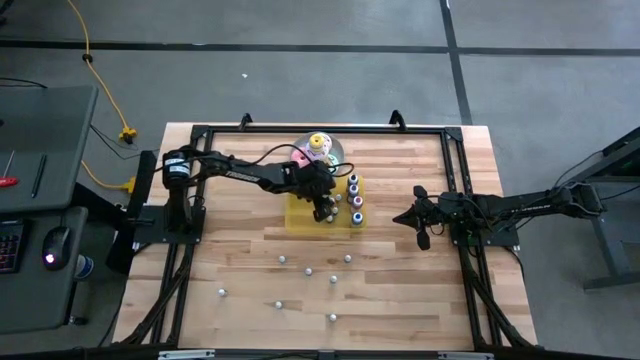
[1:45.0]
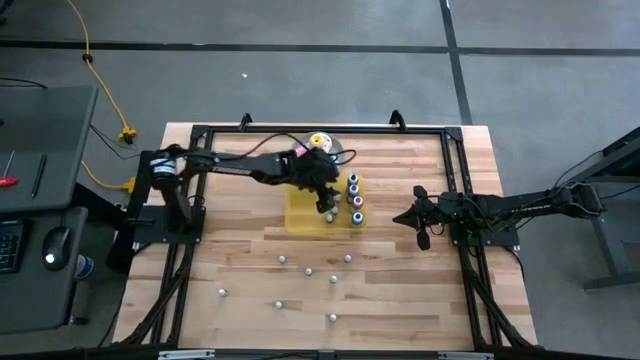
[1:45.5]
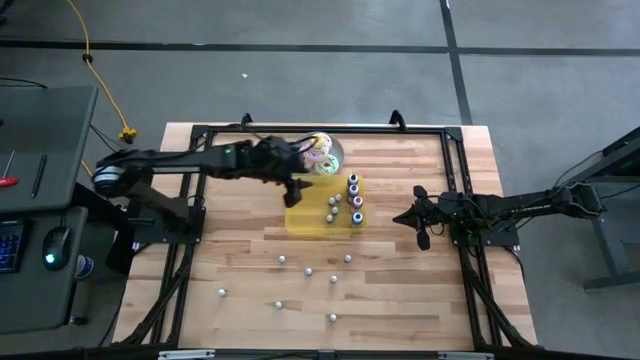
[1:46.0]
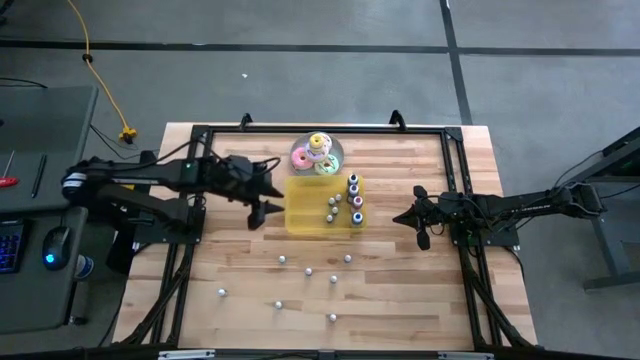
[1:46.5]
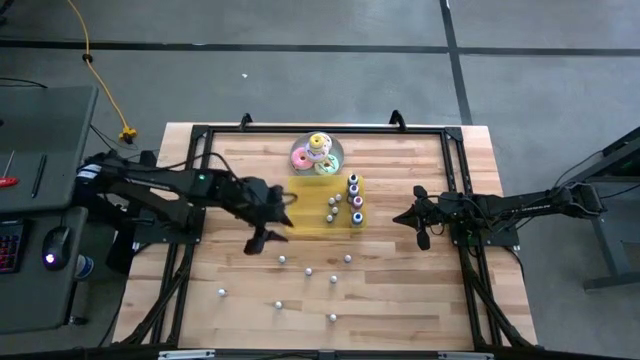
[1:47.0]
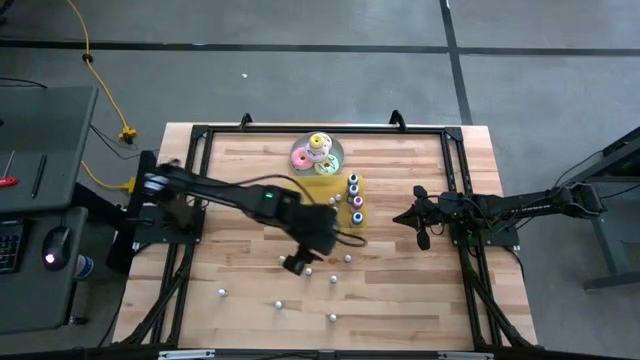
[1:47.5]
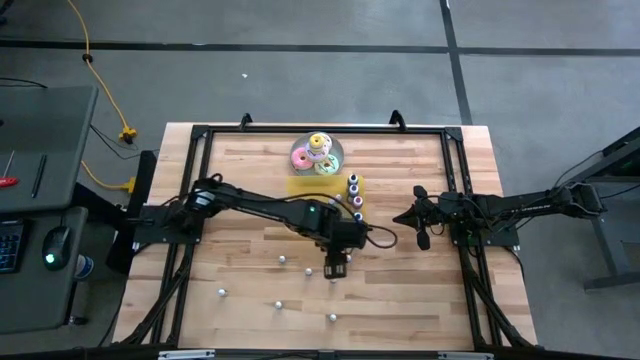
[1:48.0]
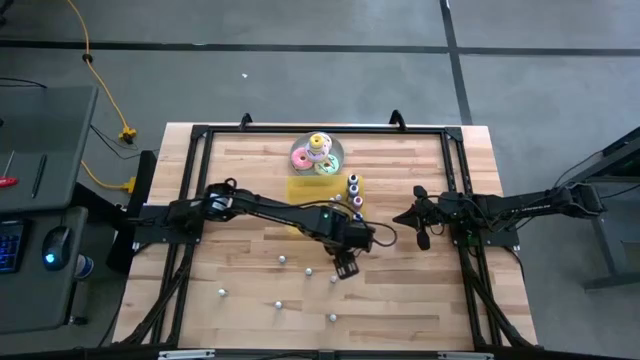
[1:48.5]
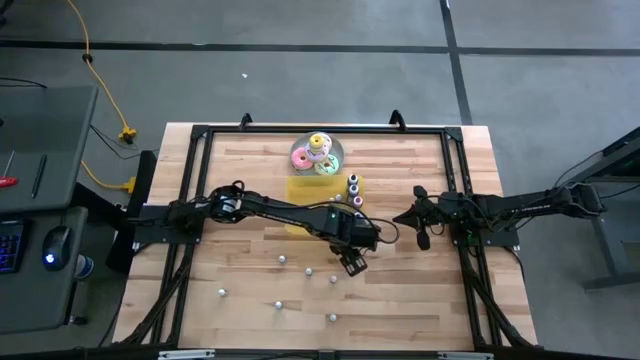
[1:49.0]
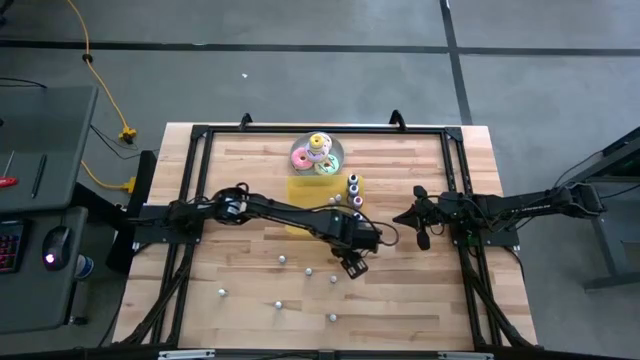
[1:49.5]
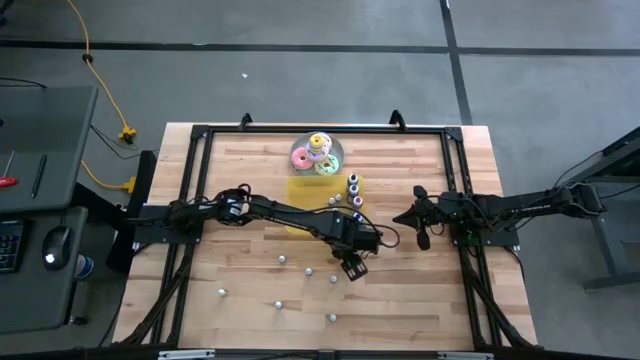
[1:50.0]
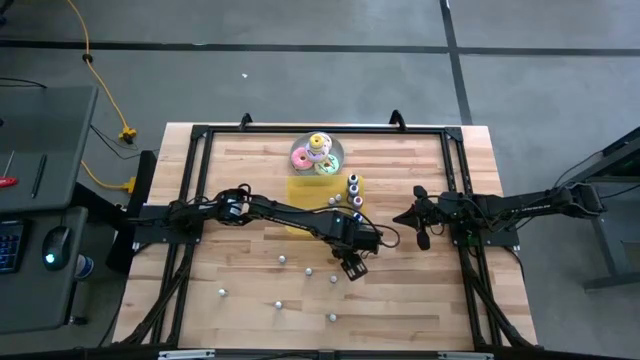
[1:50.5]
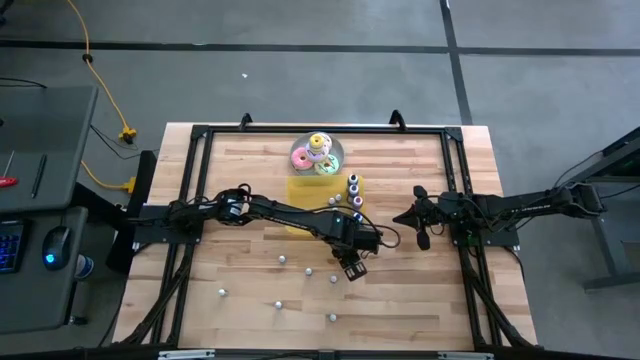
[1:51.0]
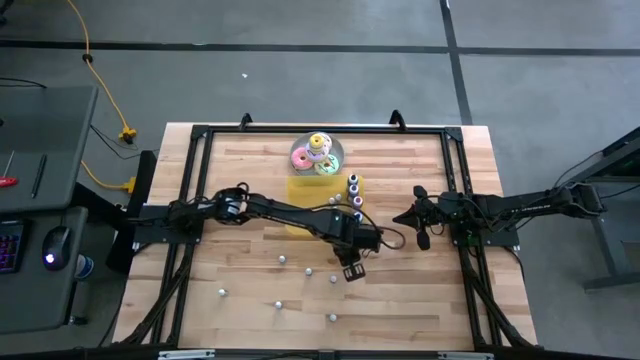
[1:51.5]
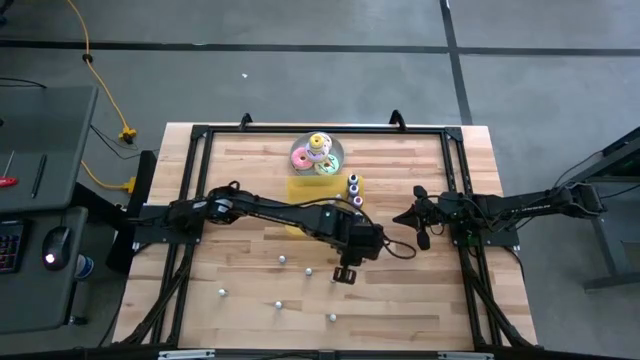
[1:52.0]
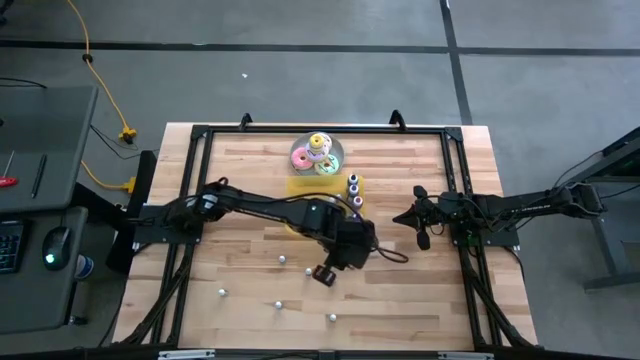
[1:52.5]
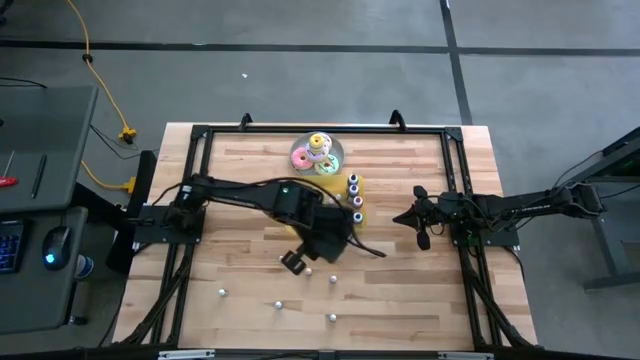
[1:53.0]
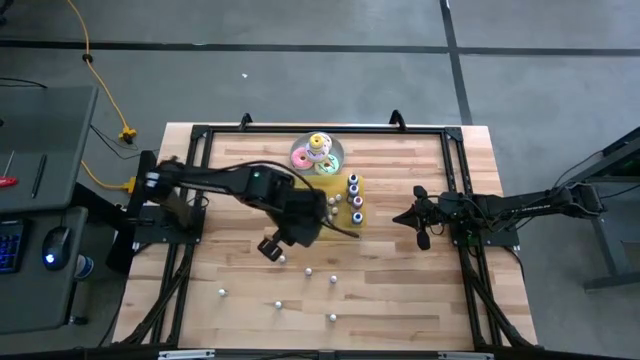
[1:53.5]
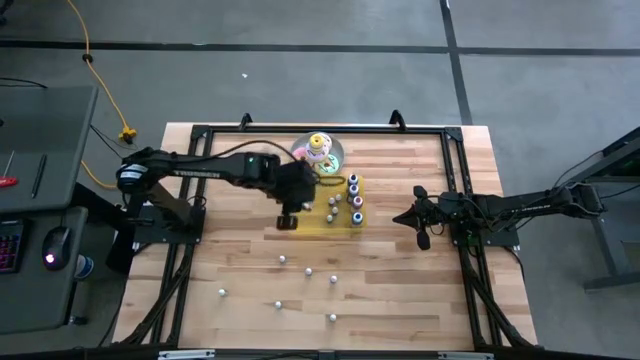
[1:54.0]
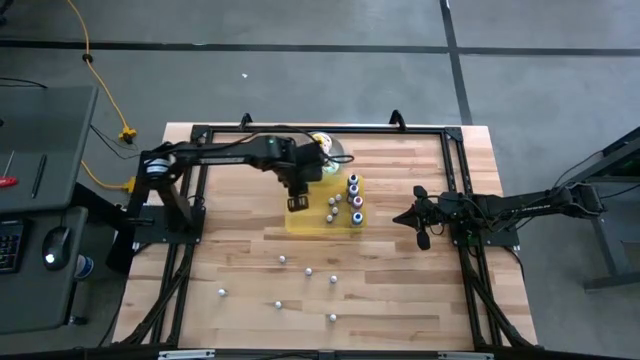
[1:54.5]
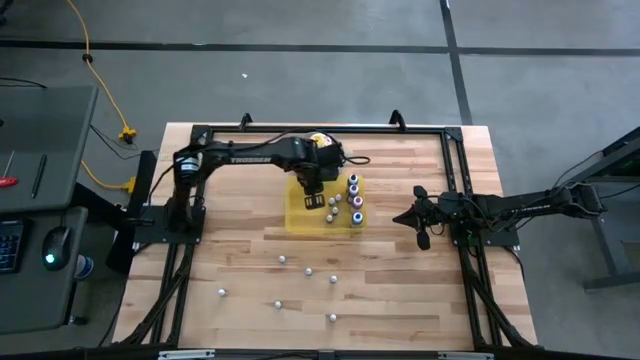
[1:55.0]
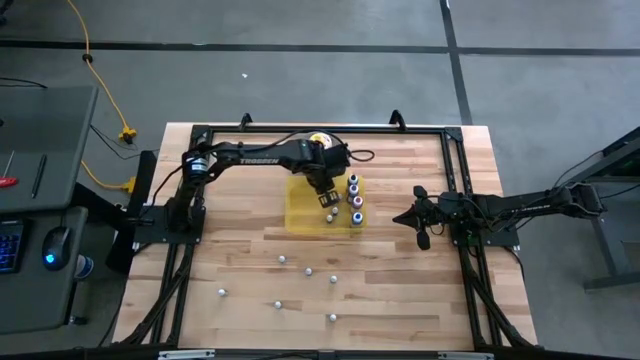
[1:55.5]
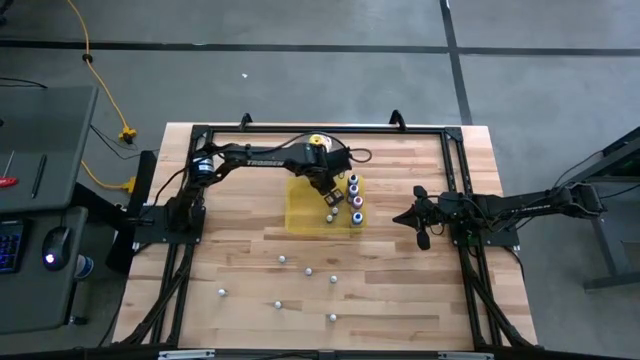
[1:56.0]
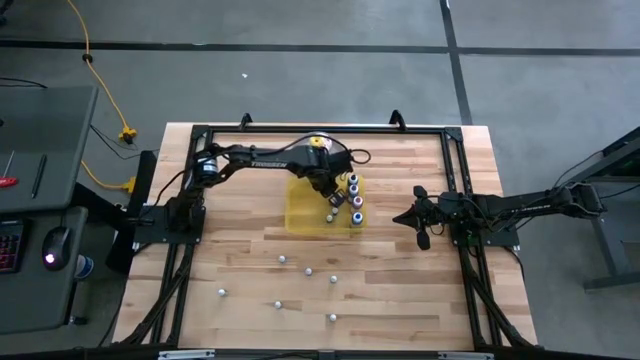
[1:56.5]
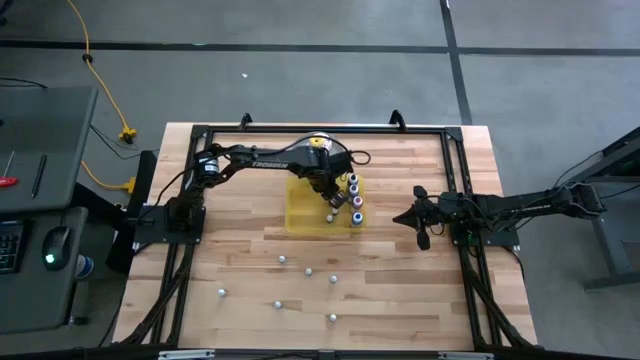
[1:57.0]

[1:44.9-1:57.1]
Task: Pick & Place food coloring
Put the top small red food coloring bottle into the yellow container

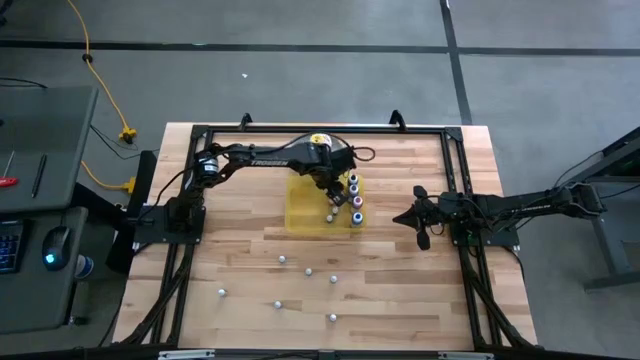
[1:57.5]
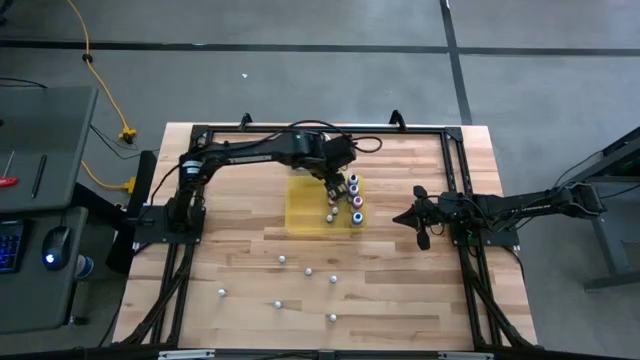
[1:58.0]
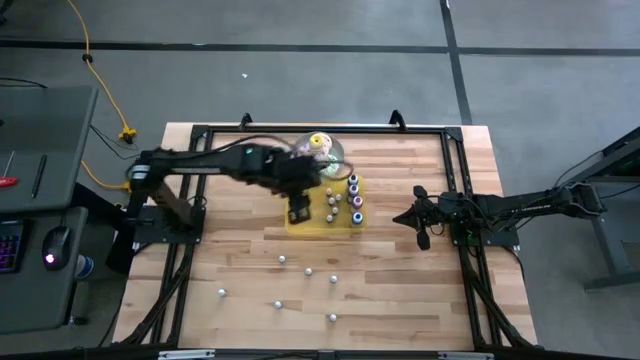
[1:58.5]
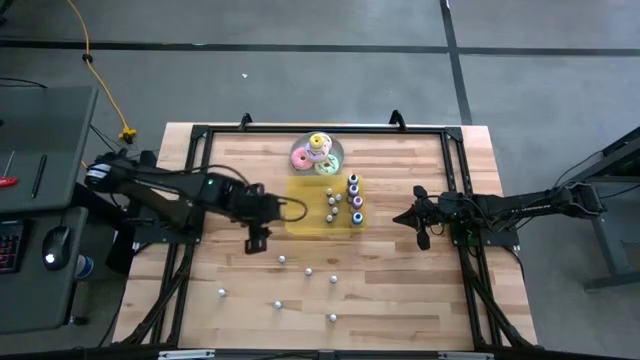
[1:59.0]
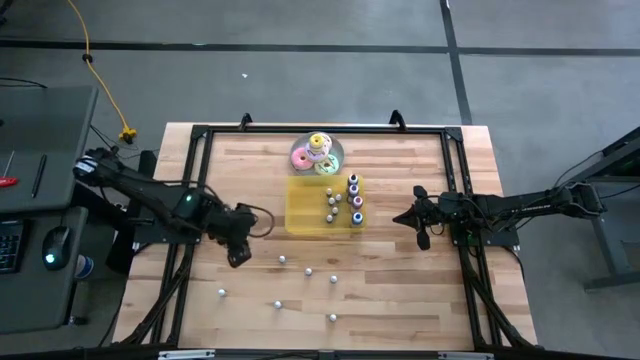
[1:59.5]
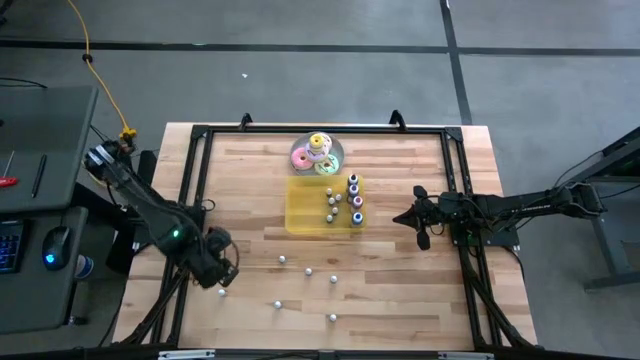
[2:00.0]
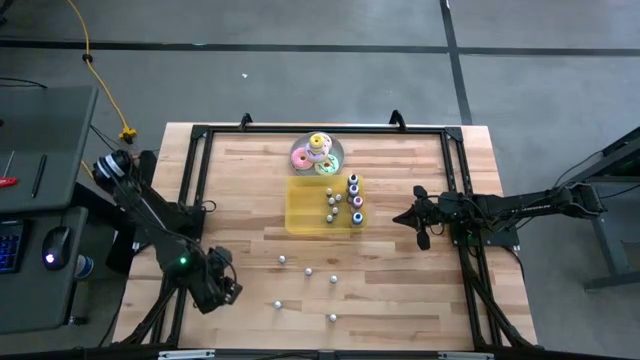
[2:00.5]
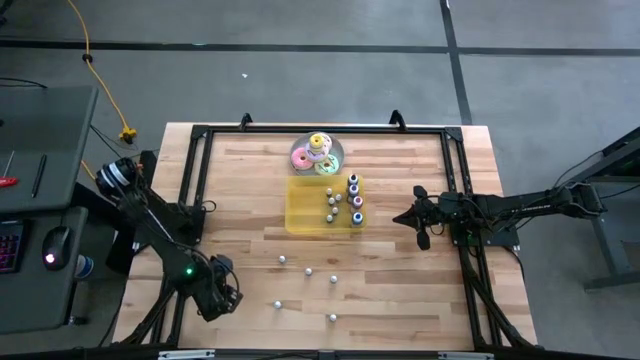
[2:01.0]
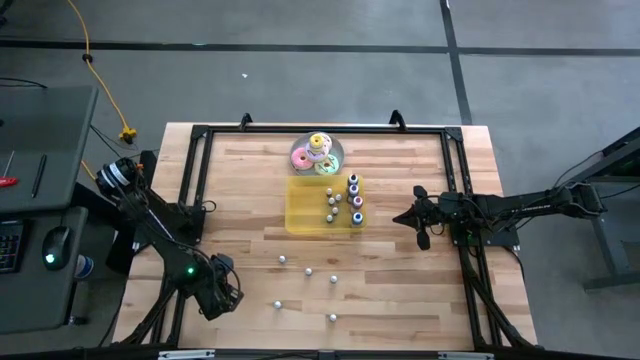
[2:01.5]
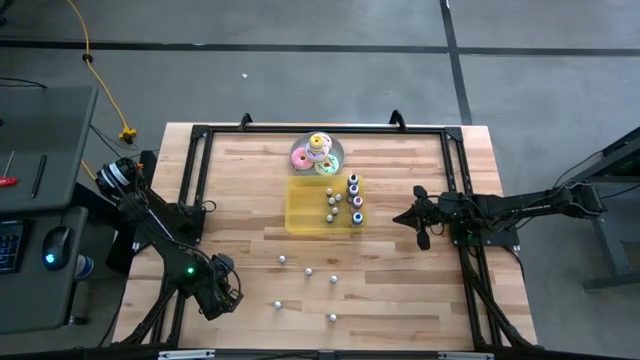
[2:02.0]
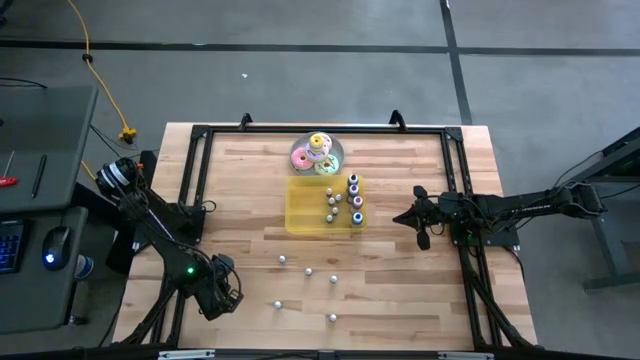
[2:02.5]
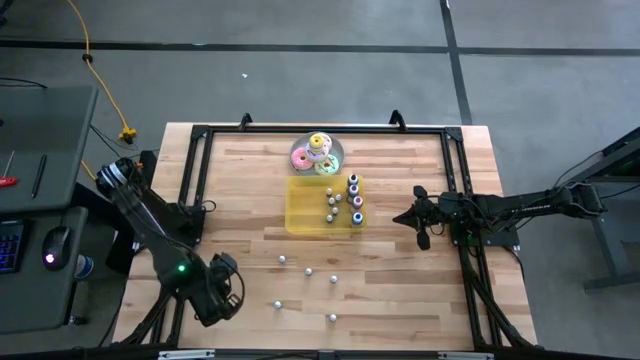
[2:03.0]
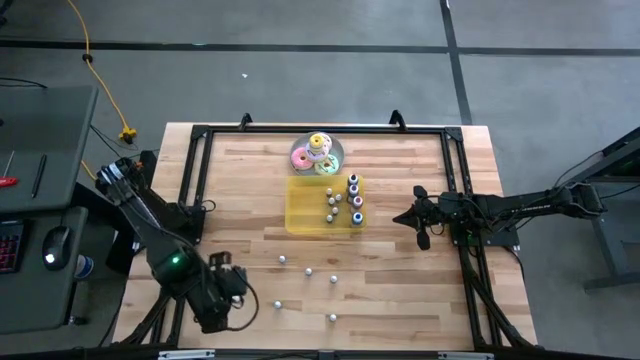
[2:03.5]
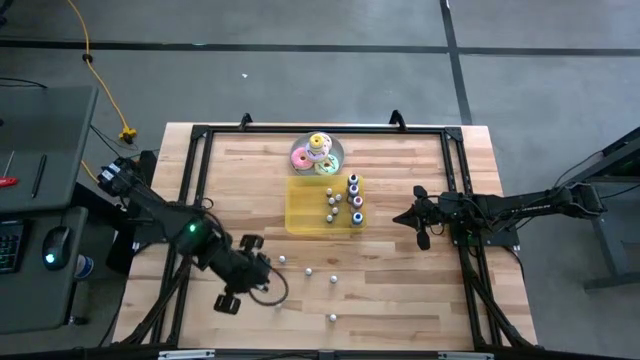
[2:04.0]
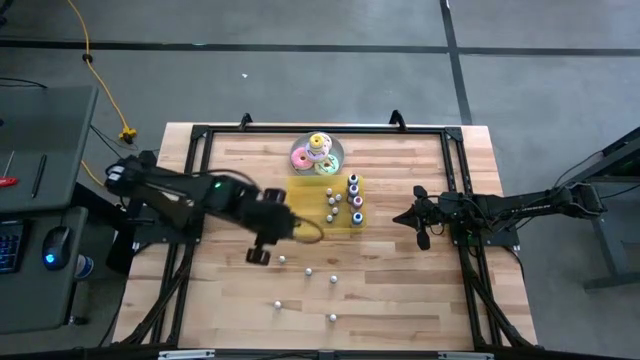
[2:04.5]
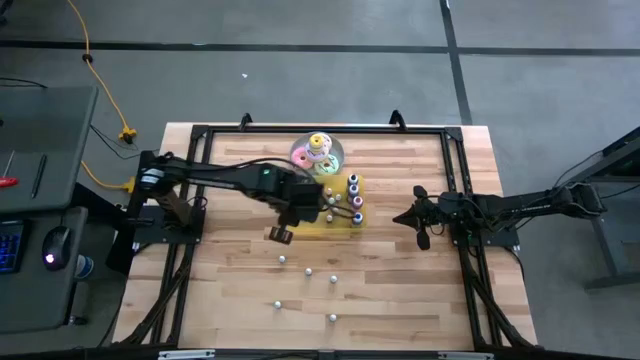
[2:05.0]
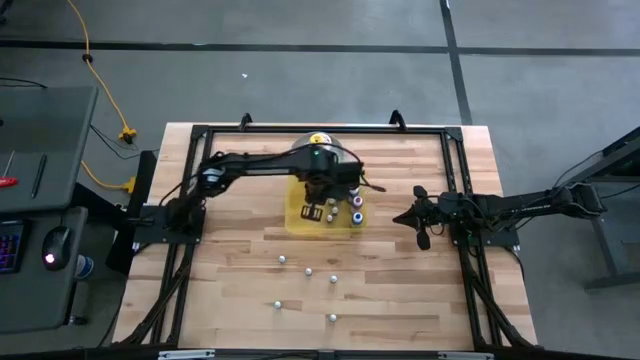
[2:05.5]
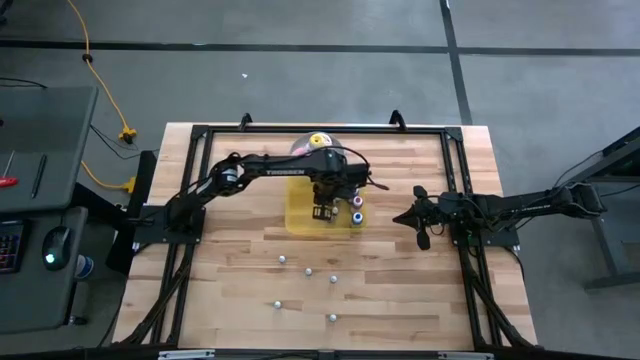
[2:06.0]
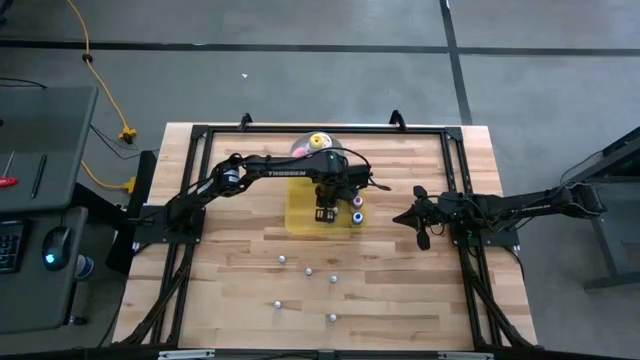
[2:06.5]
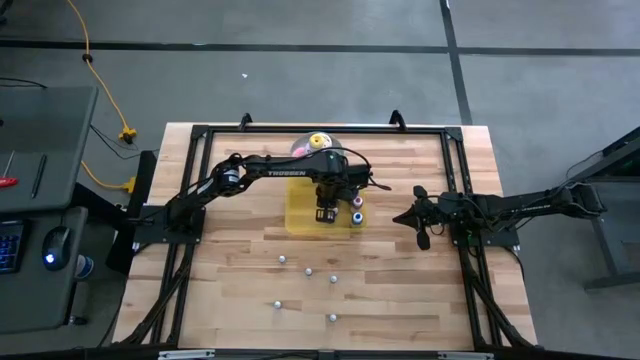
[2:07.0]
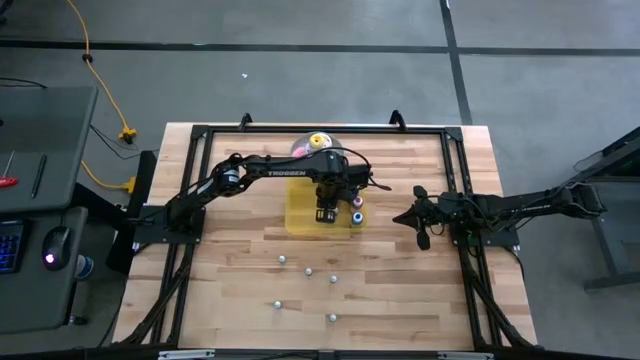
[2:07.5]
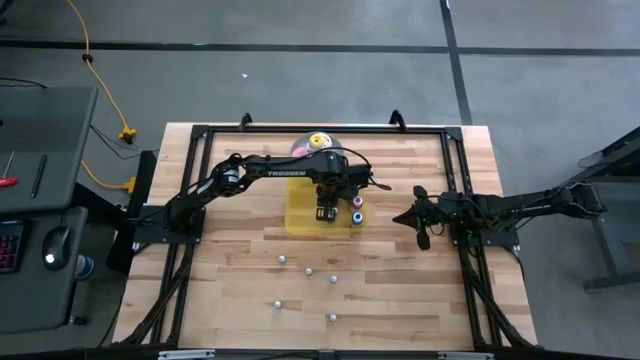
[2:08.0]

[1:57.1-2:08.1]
Put the bottom left small black food coloring bottle into the yellow container
